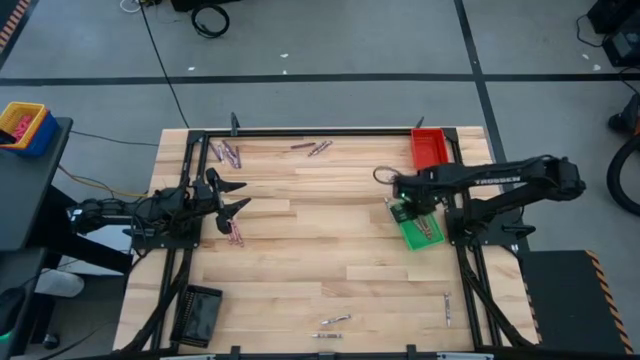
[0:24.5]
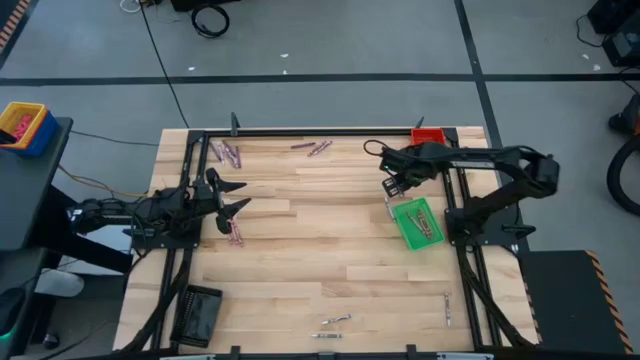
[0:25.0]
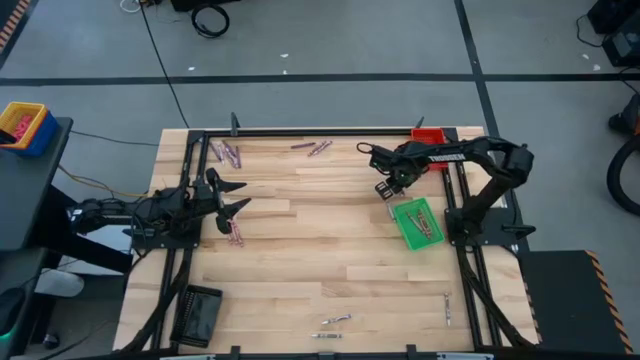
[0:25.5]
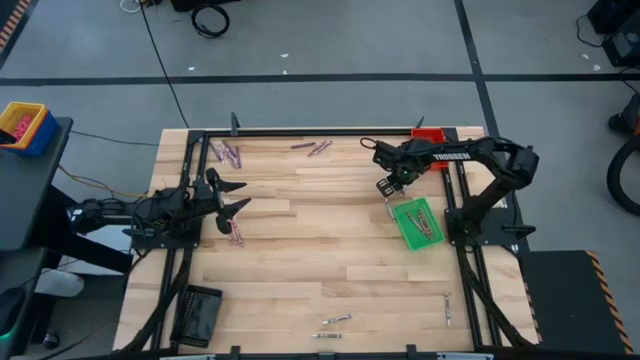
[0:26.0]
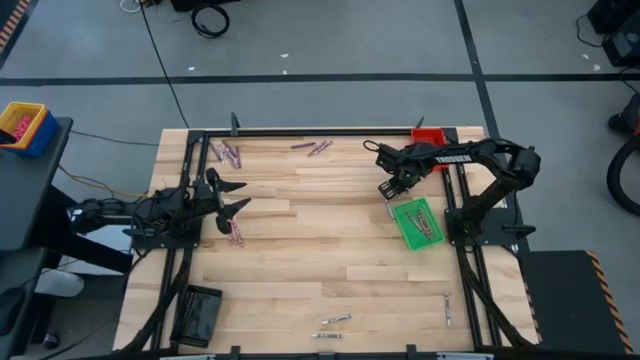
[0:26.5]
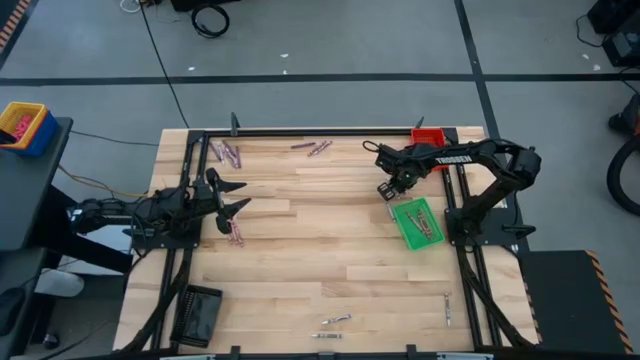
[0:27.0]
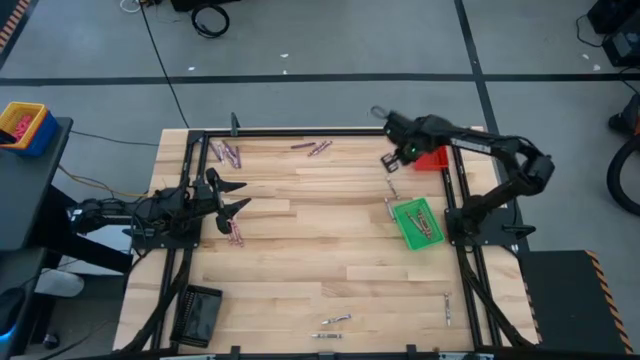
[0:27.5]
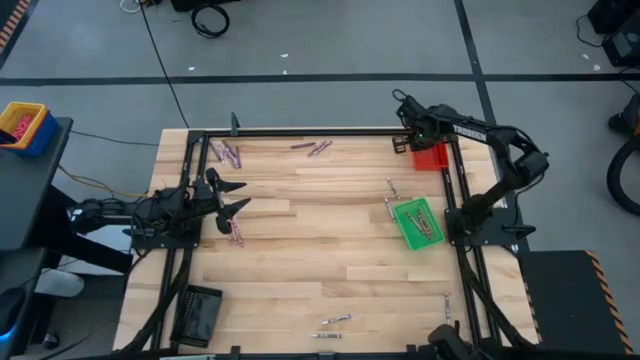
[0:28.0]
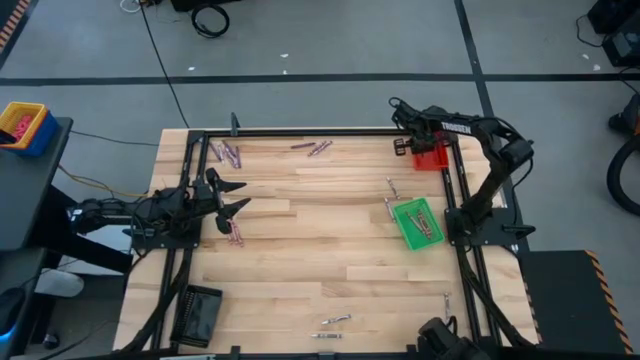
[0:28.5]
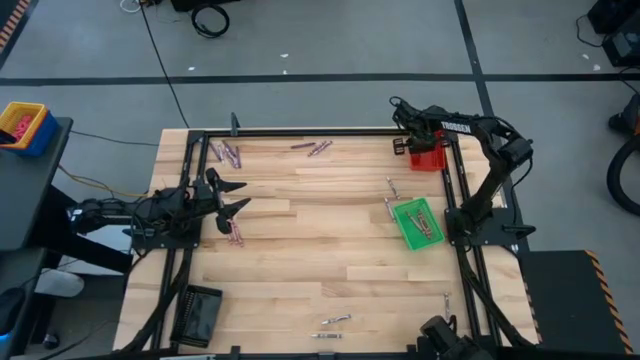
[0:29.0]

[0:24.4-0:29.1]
Task: Sort crayons
Put the purple crayon into the red bin

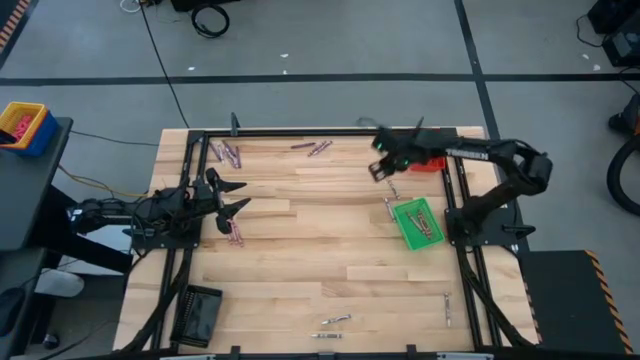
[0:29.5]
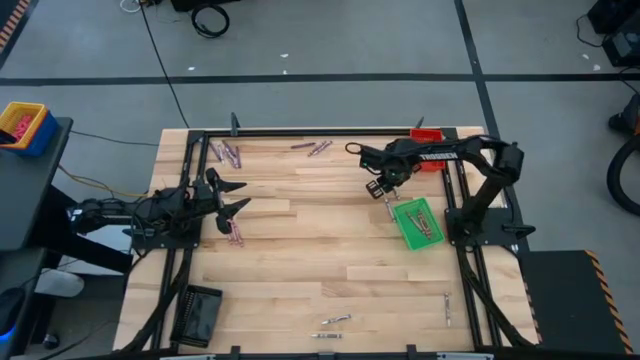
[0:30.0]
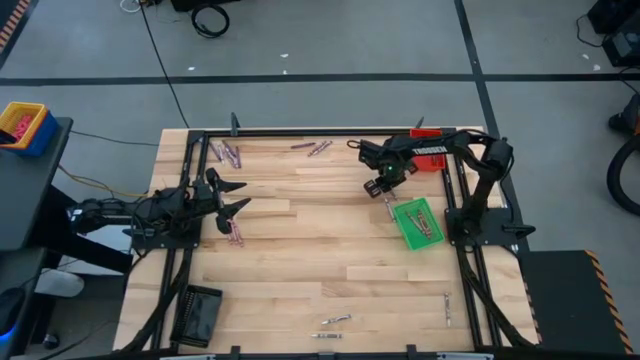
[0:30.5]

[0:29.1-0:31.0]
Move the white crayon to the center of the table

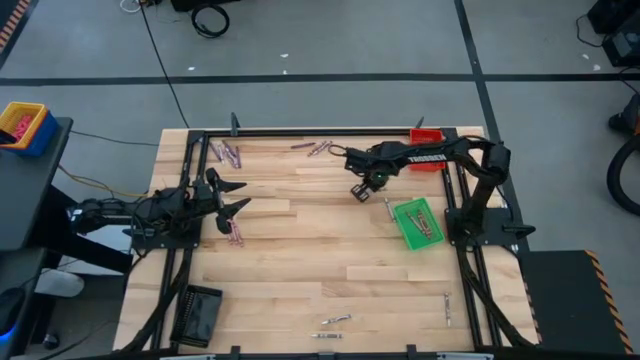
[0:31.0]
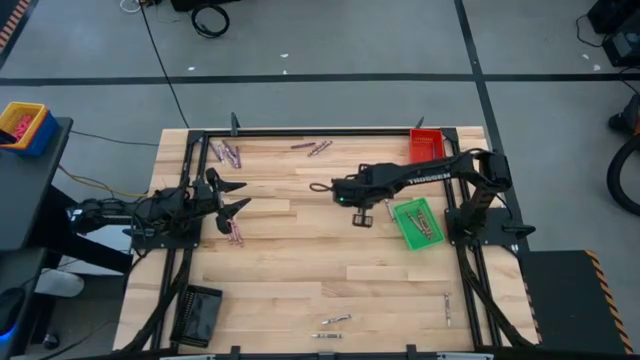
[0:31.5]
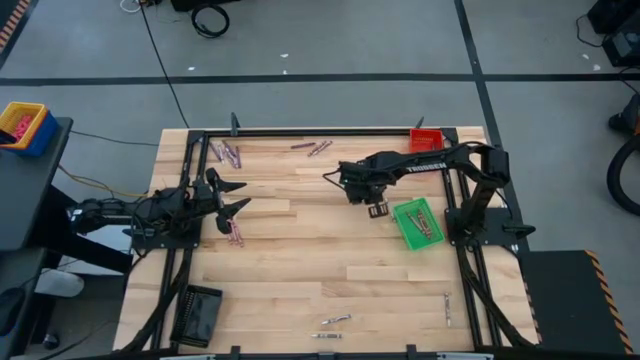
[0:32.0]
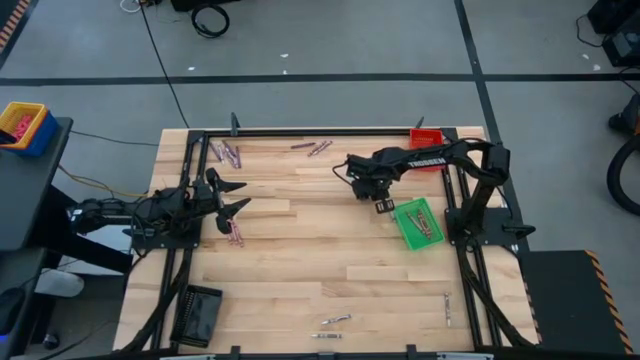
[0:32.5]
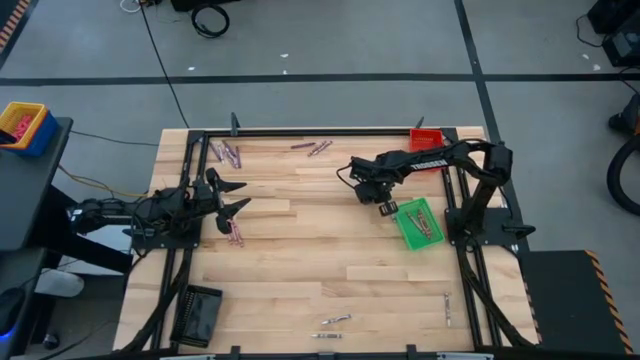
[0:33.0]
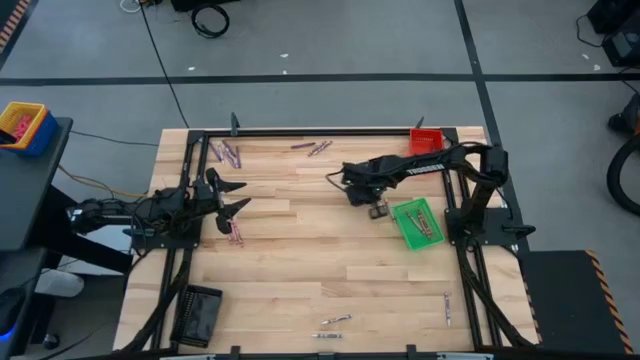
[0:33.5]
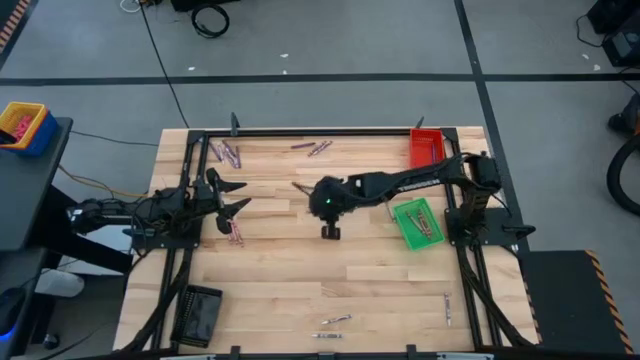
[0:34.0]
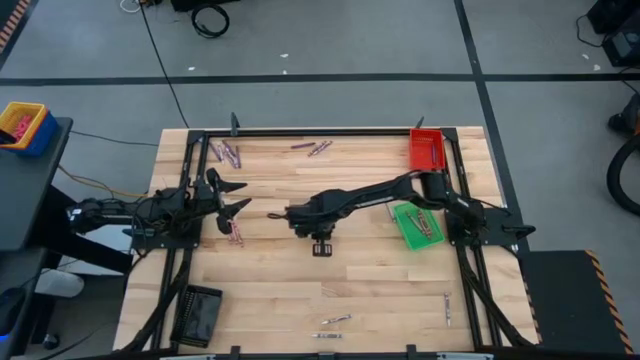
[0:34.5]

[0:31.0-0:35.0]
Move the white crayon to the center of the table

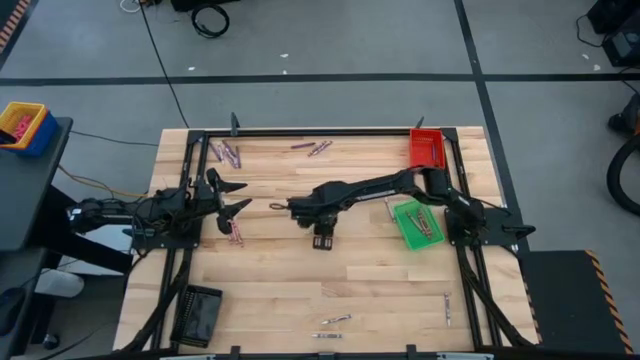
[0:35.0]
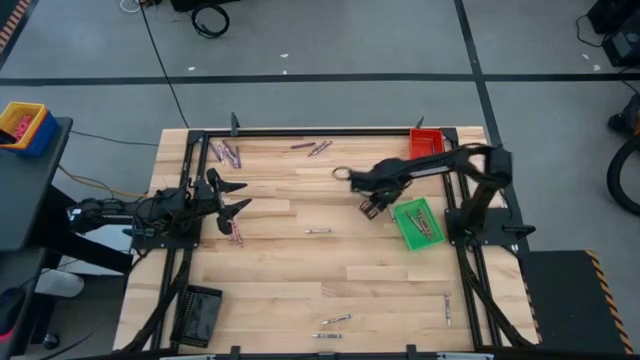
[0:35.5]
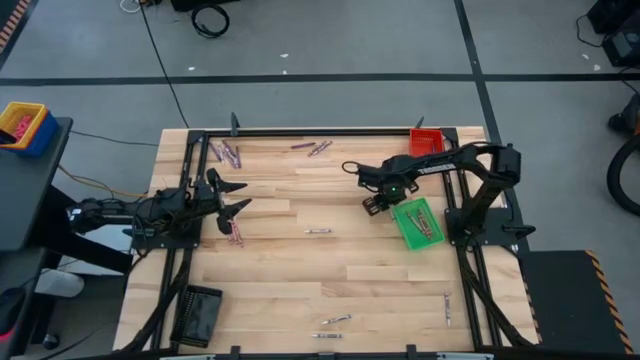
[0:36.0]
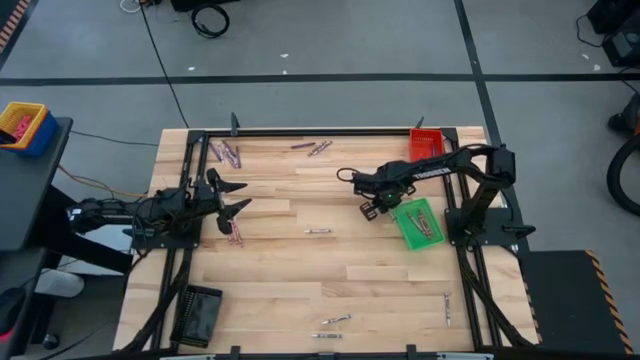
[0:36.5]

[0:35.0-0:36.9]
Move the white crayon to the center of the table

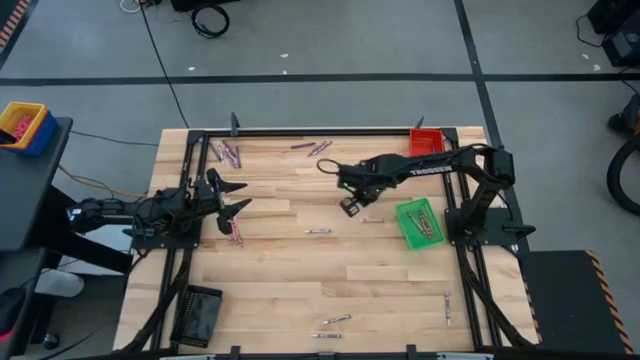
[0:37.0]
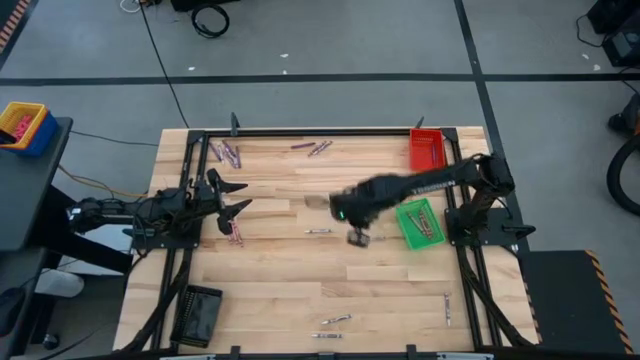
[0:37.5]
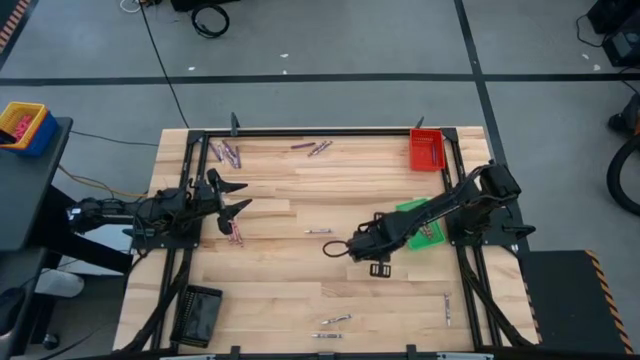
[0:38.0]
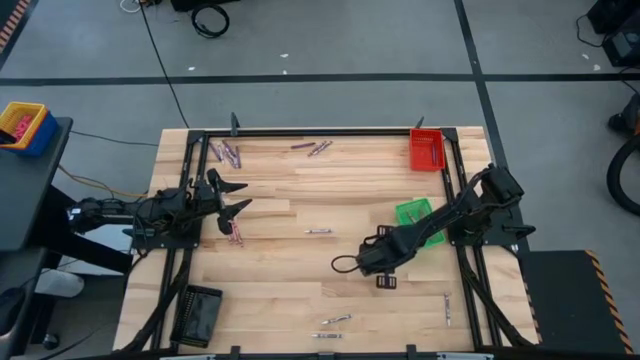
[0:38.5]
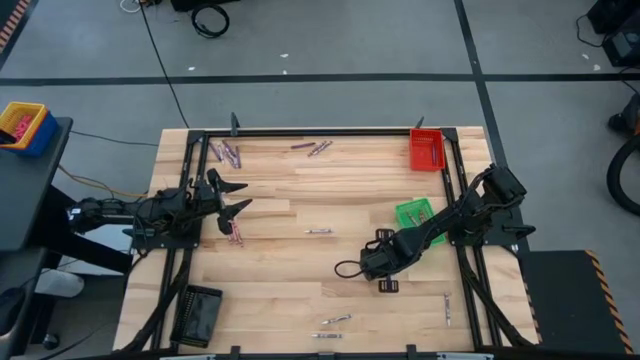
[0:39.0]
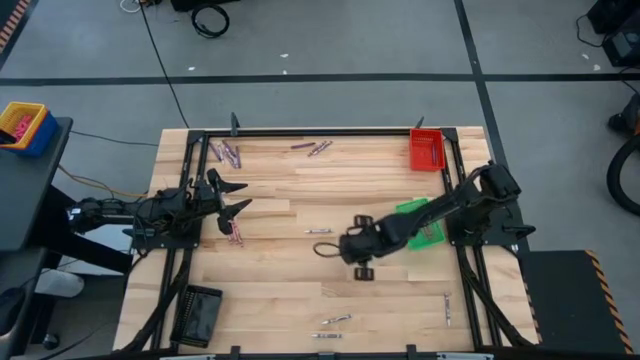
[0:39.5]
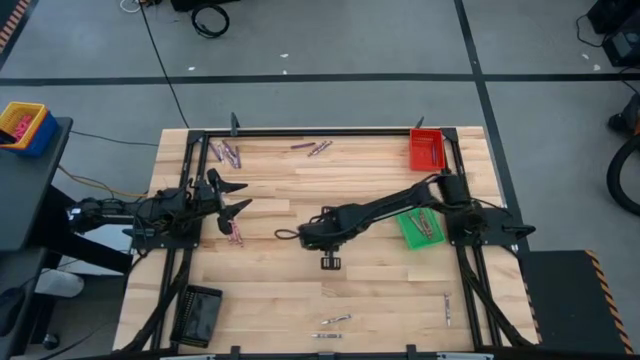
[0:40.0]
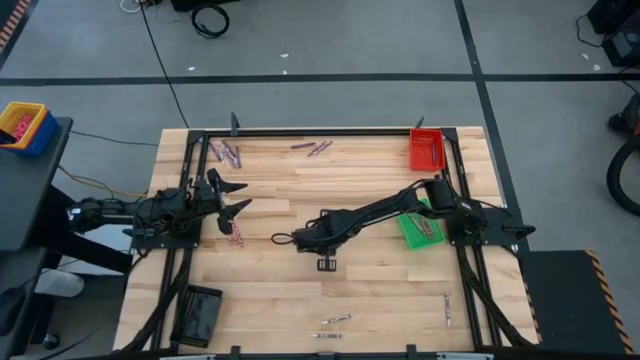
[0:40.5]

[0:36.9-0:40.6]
Move the white crayon to the center of the table

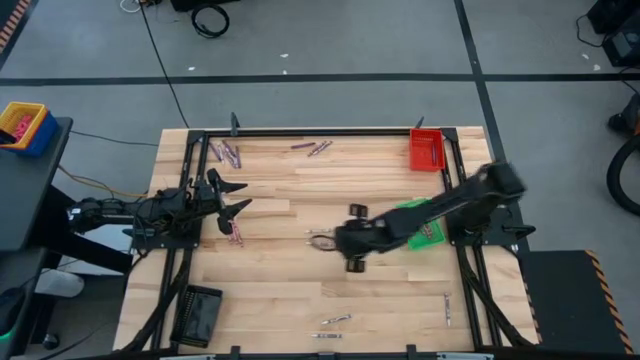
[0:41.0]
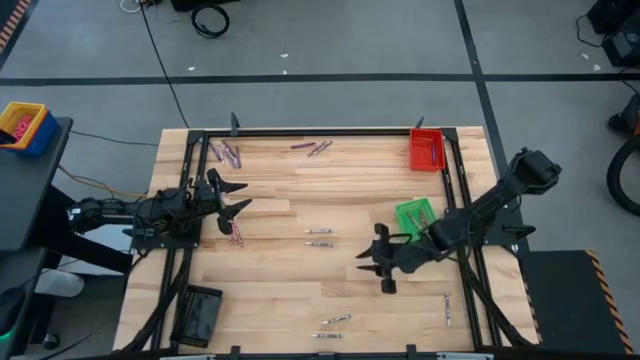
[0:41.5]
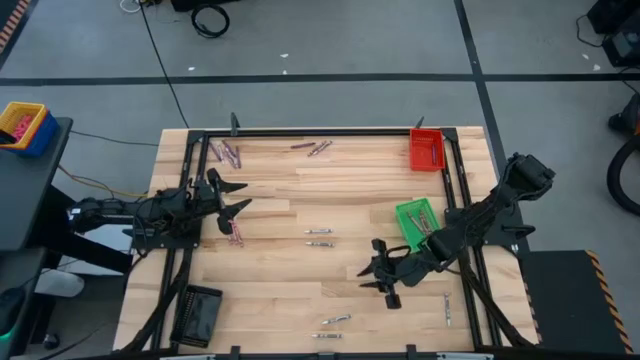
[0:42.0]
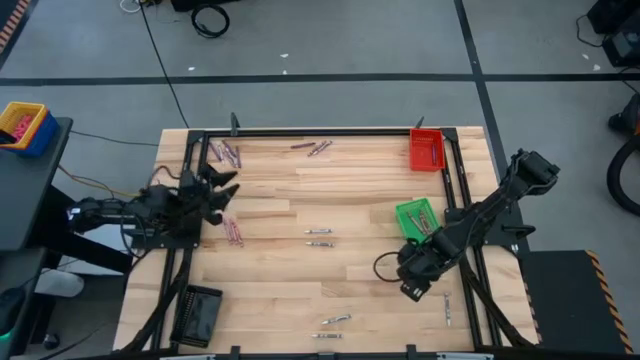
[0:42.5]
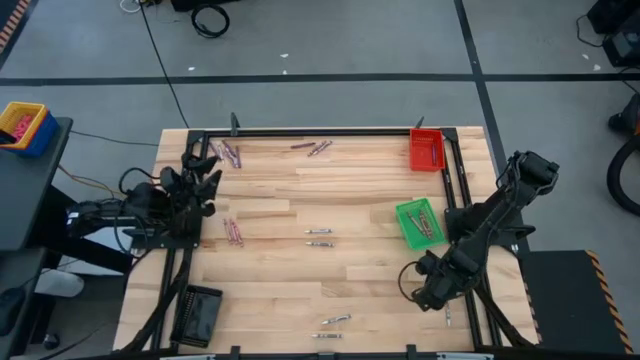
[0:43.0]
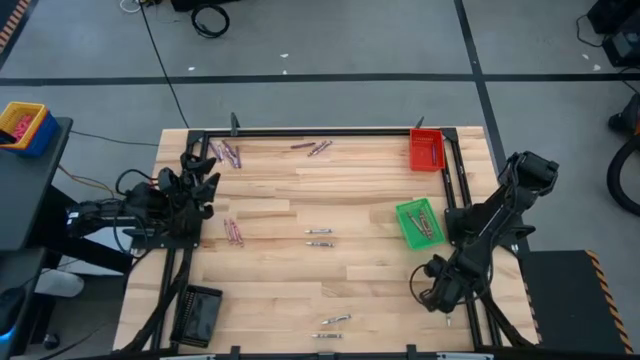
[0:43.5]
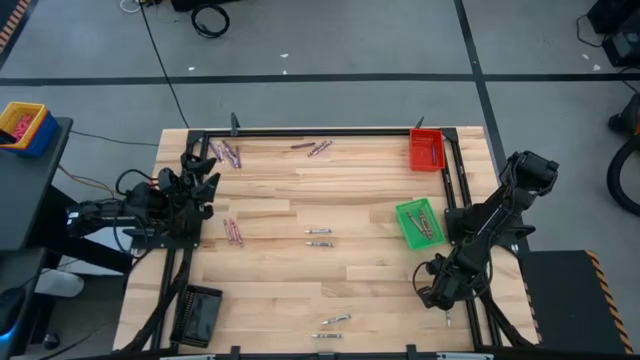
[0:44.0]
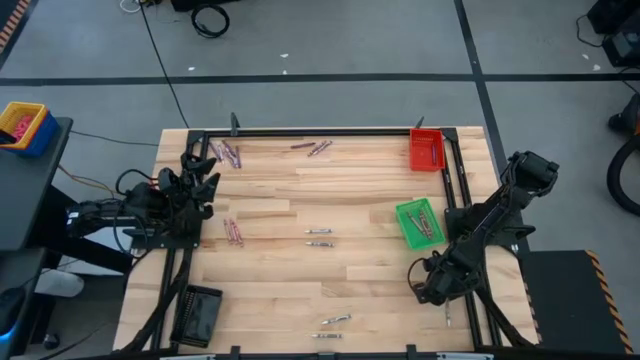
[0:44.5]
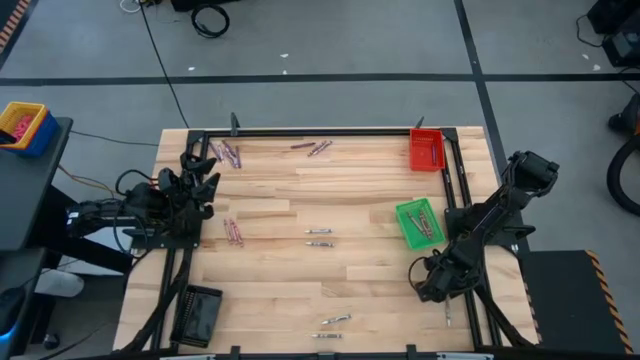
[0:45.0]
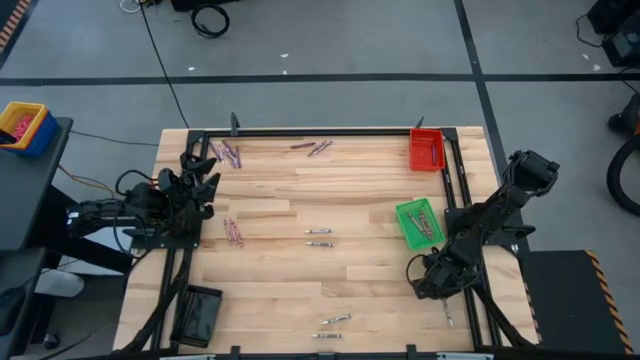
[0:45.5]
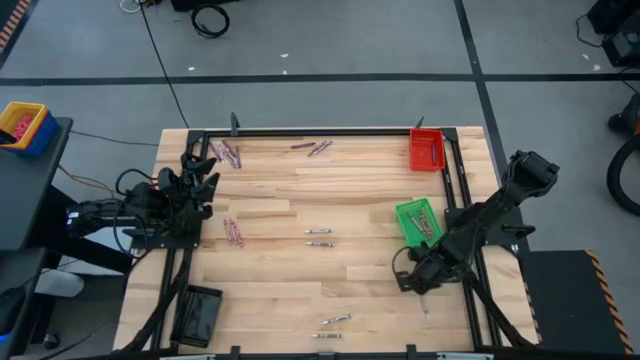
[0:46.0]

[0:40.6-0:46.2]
Move the white crayon to the center of the table
